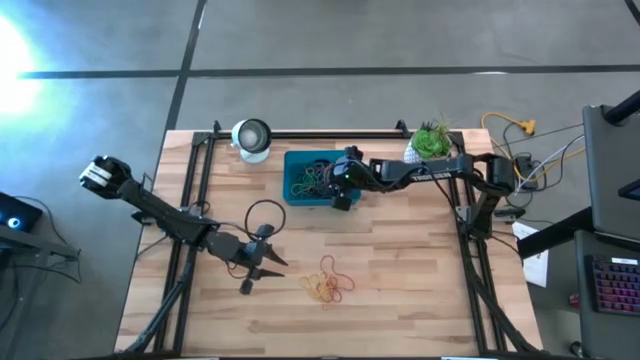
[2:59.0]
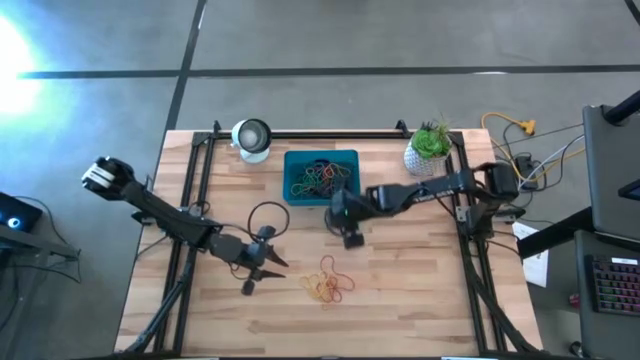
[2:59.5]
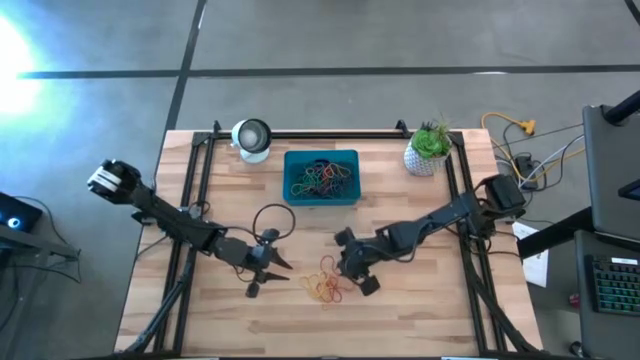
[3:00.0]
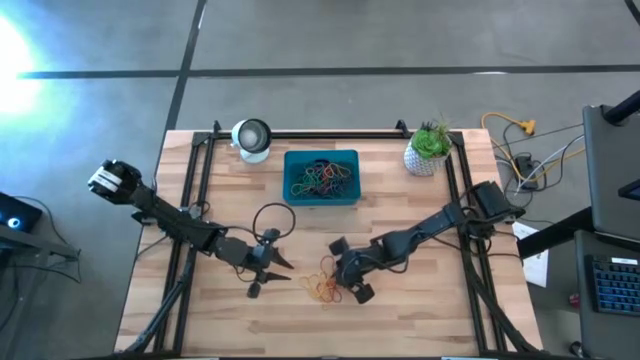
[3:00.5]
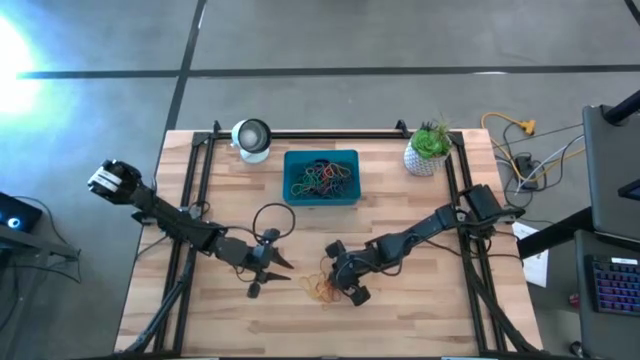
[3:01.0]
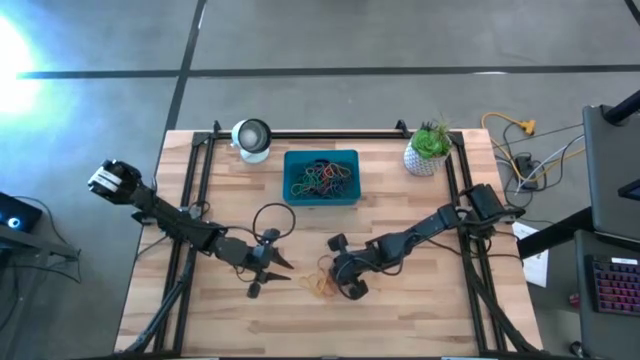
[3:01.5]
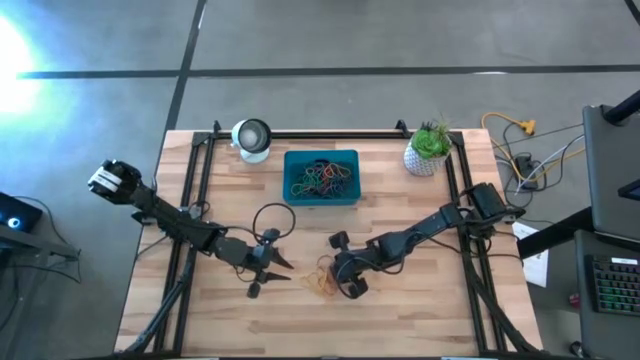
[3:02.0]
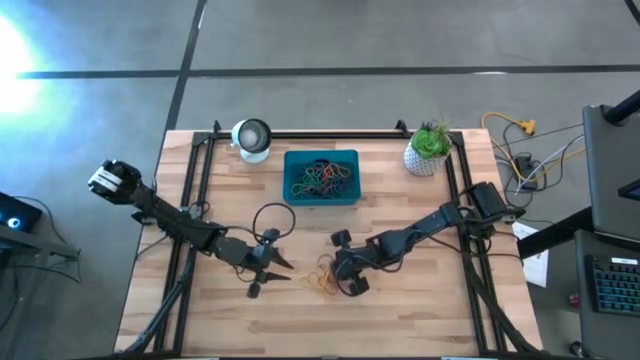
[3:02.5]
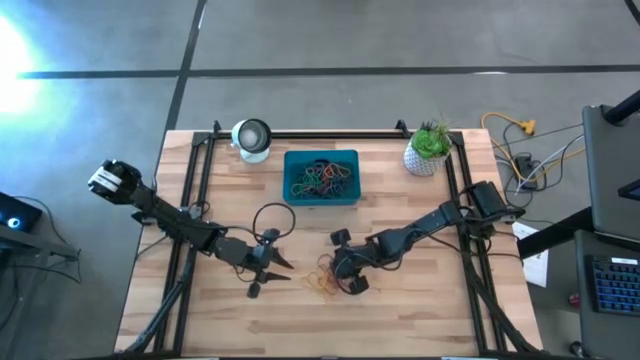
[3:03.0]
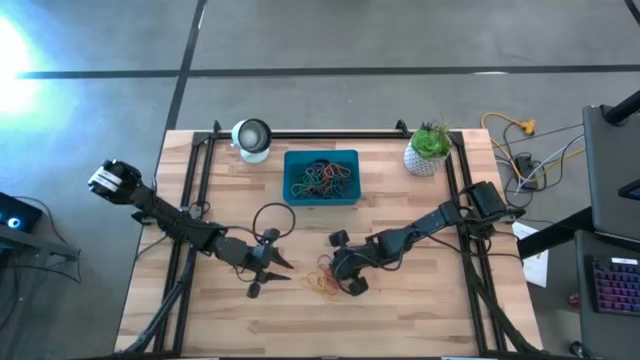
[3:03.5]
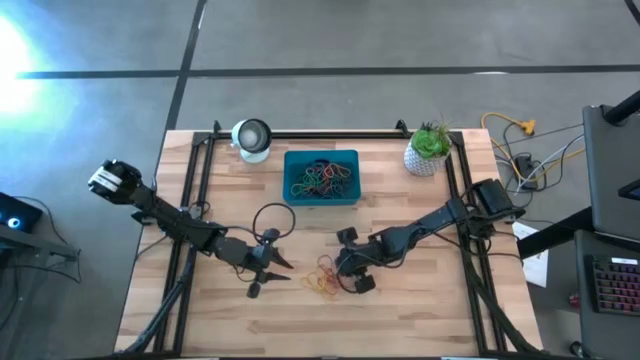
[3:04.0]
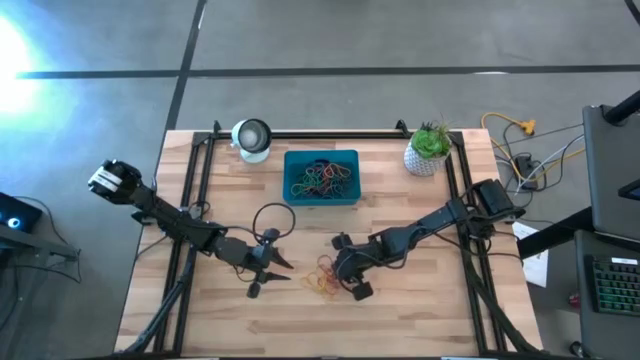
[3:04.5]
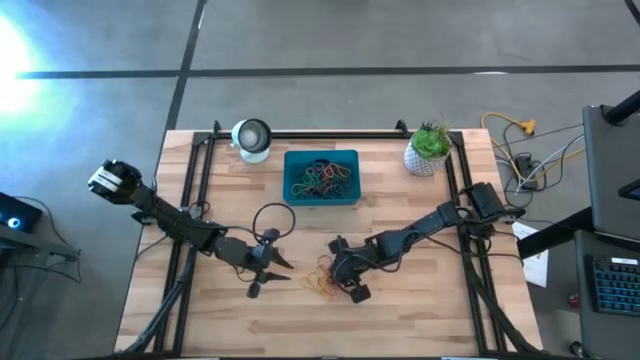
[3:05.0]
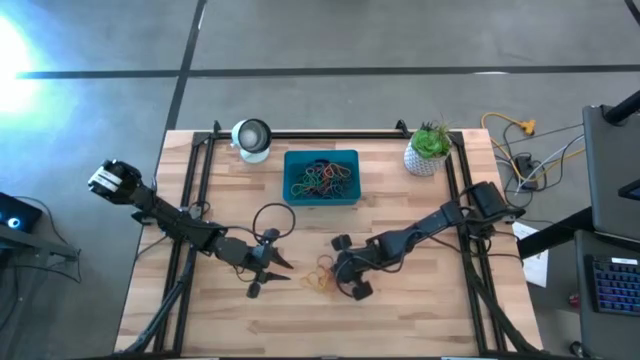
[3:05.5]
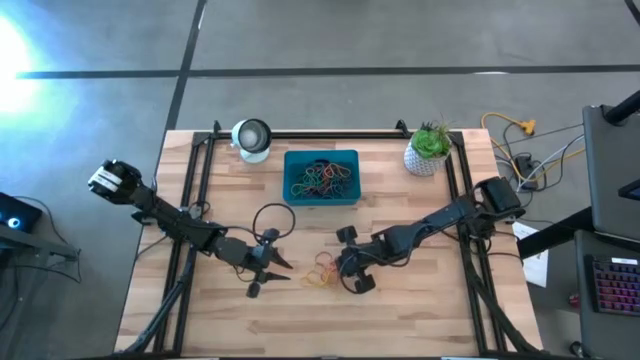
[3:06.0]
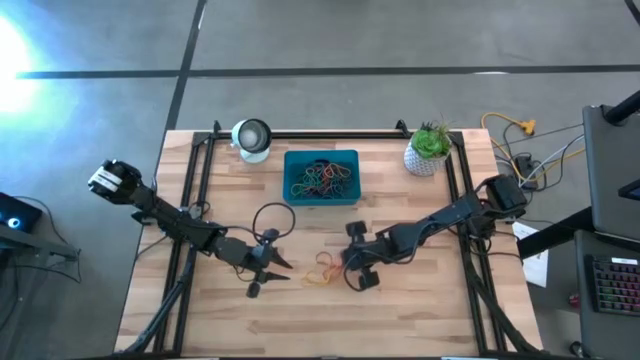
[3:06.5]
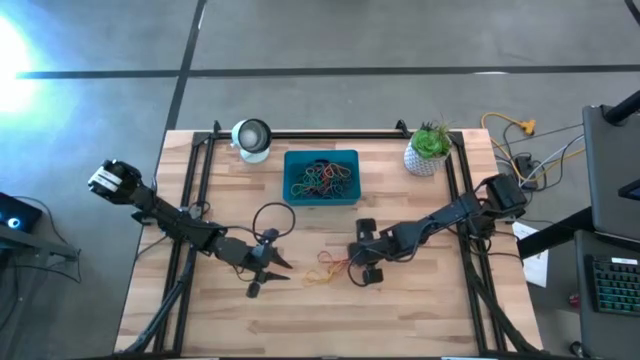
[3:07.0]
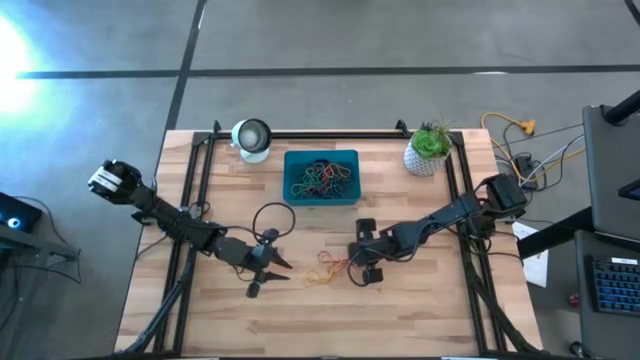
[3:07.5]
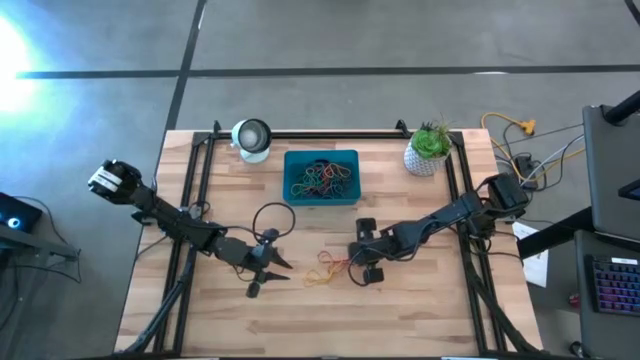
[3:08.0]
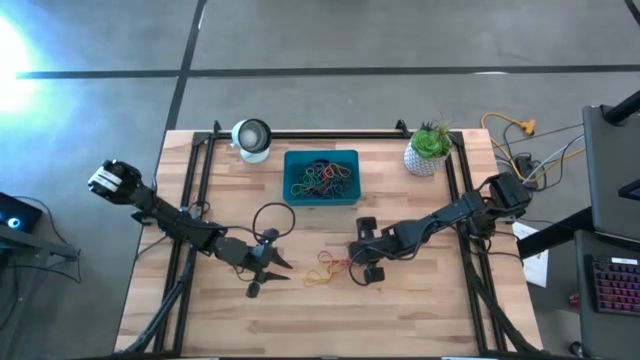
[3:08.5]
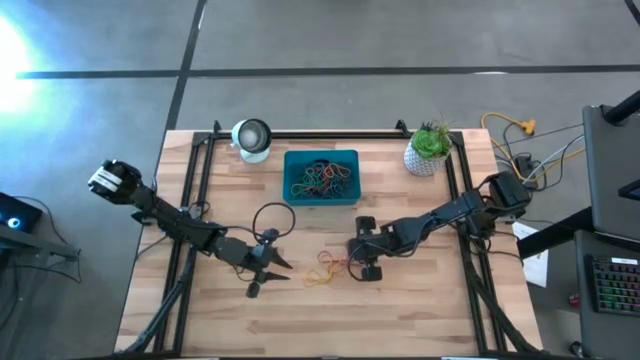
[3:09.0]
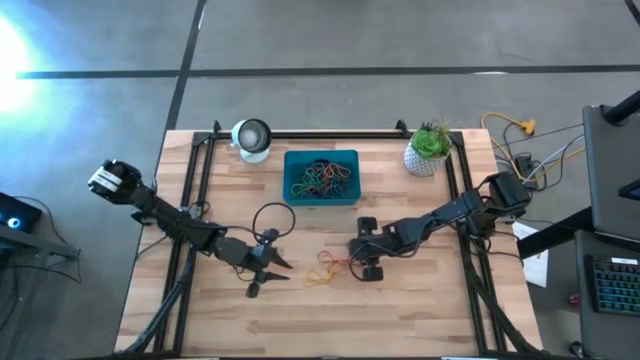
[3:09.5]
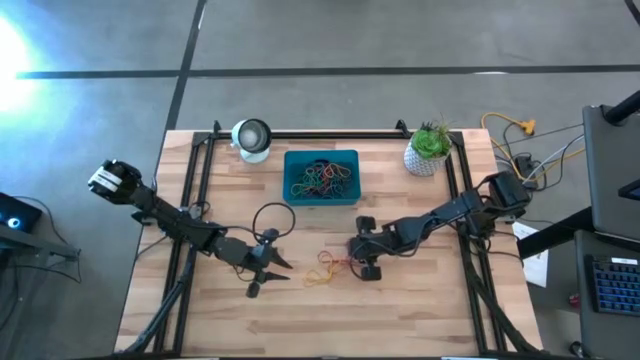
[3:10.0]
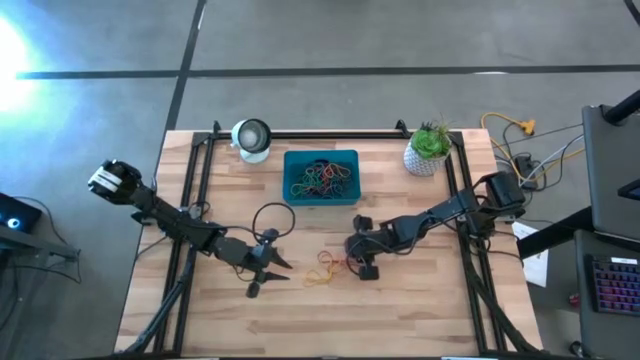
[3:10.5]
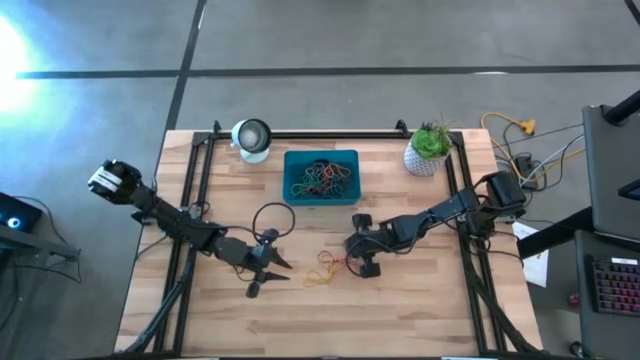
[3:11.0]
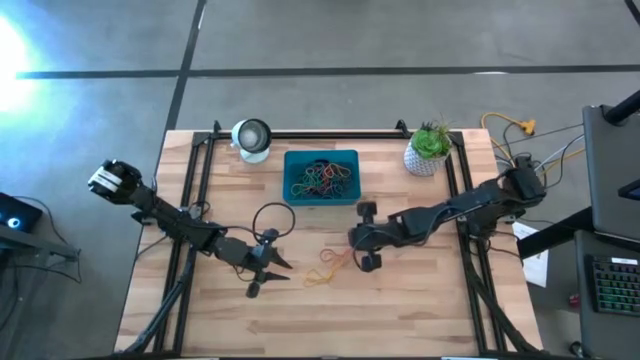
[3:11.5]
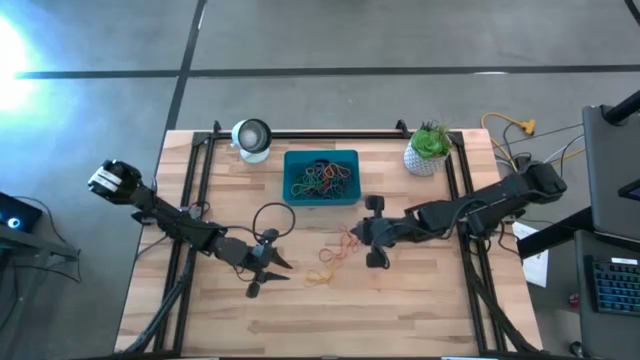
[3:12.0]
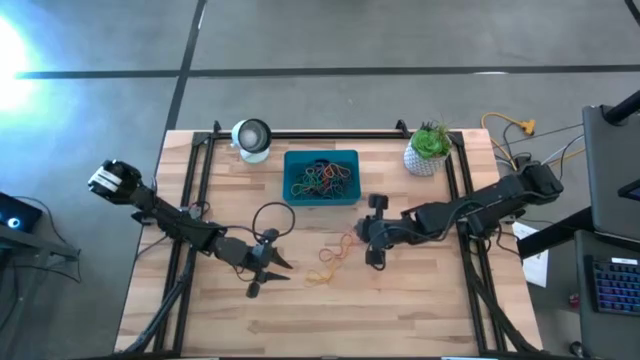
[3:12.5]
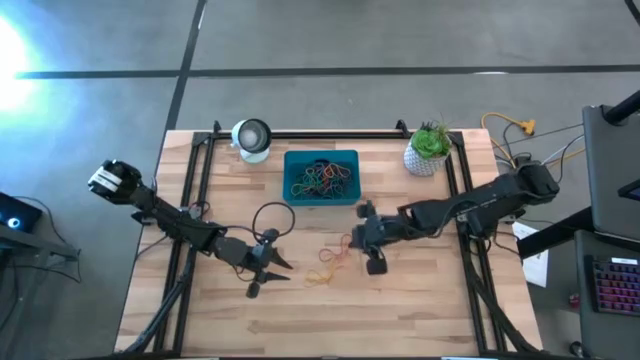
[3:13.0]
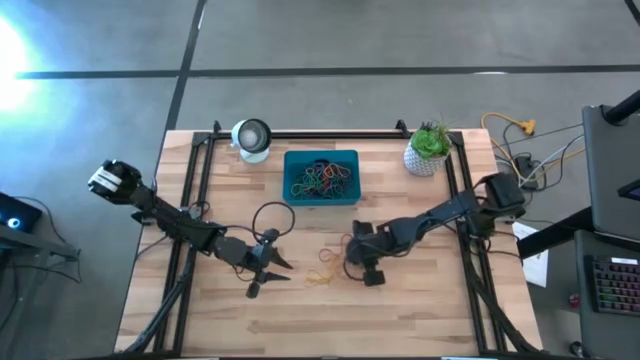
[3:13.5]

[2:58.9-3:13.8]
Task: Pick and place rubber bands into bin
Put the red rubber band into the bin

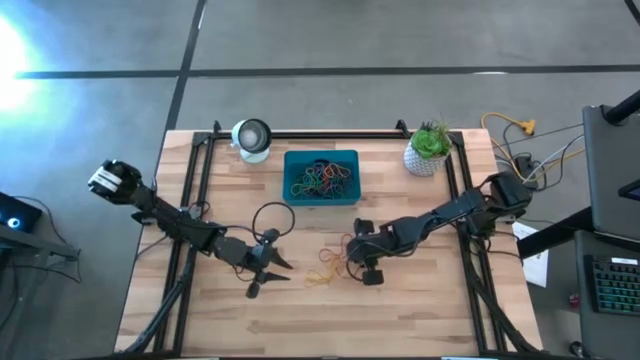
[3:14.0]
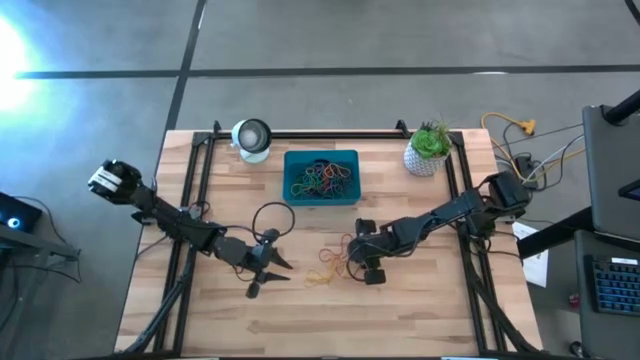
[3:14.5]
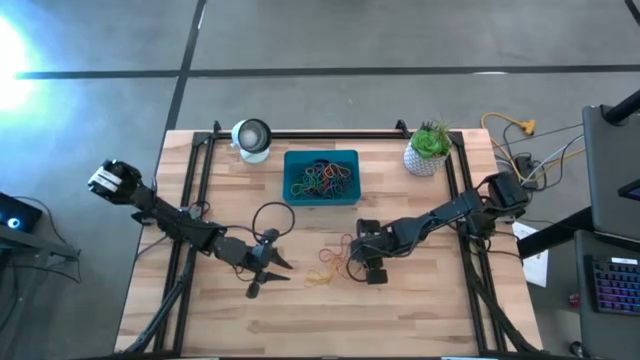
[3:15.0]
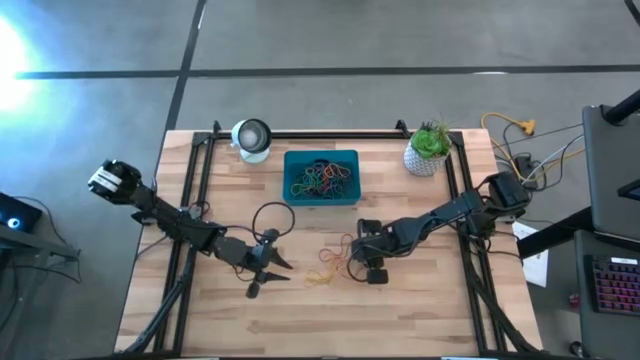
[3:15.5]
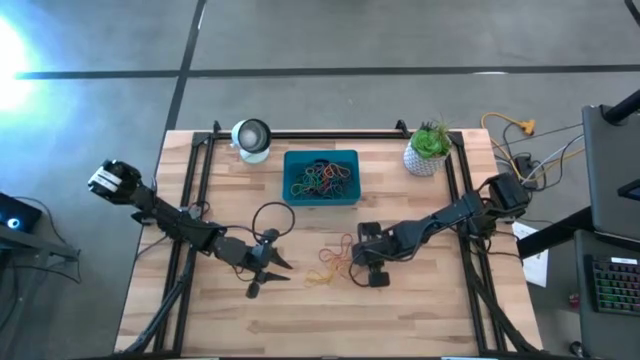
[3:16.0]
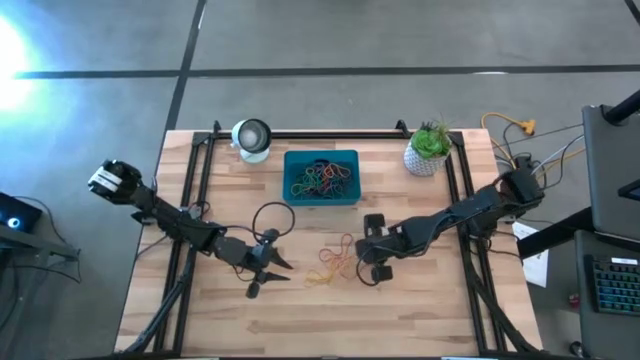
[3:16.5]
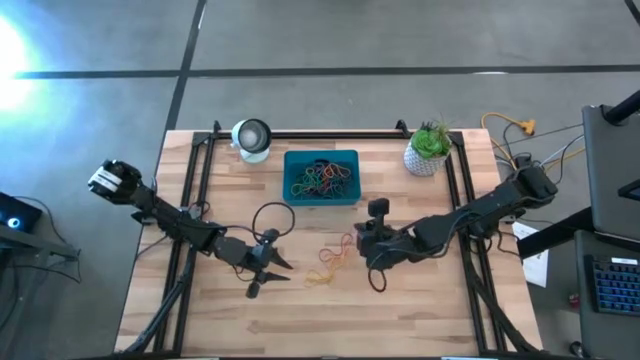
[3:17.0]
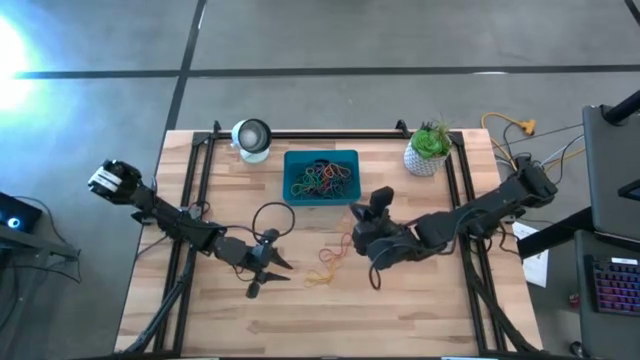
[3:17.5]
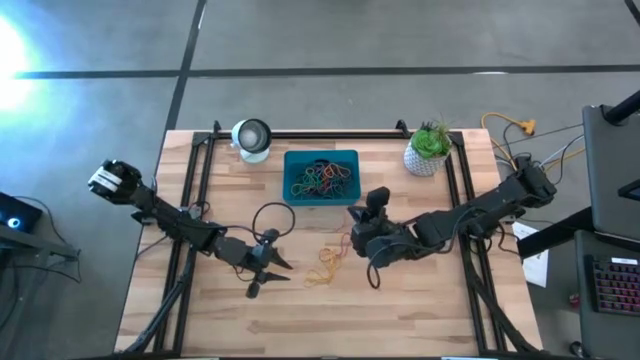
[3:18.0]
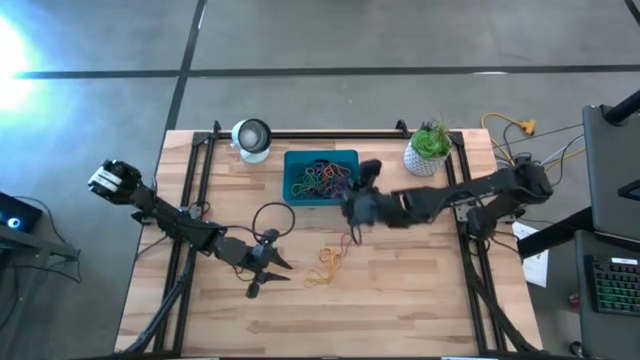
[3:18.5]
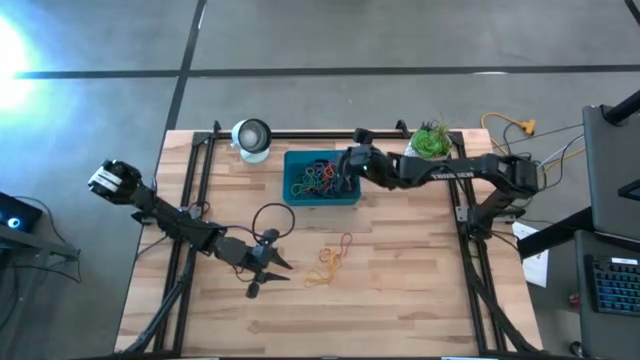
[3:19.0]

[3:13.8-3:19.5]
Put the red rubber band into the bin

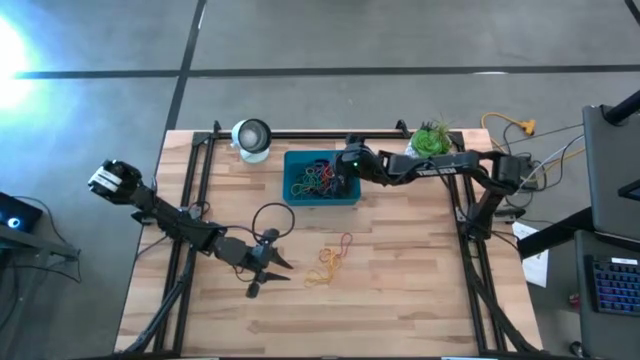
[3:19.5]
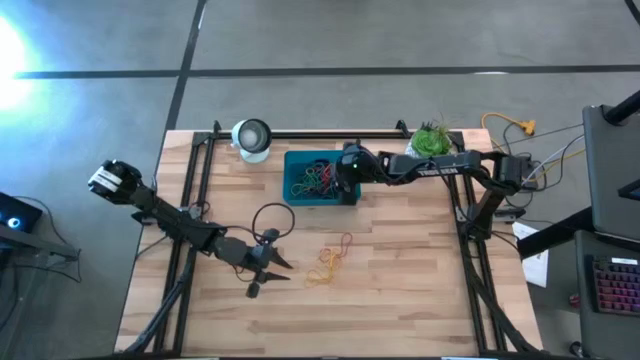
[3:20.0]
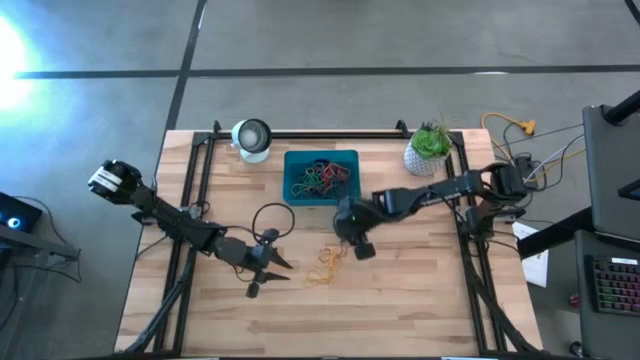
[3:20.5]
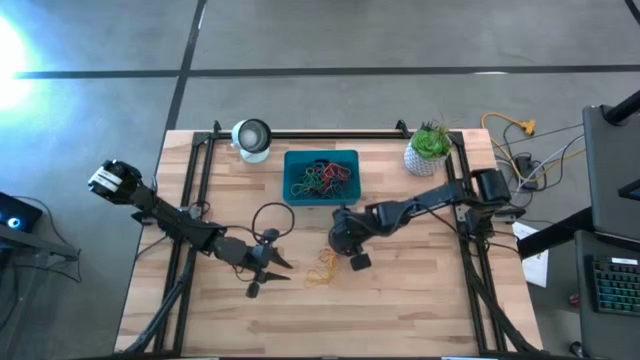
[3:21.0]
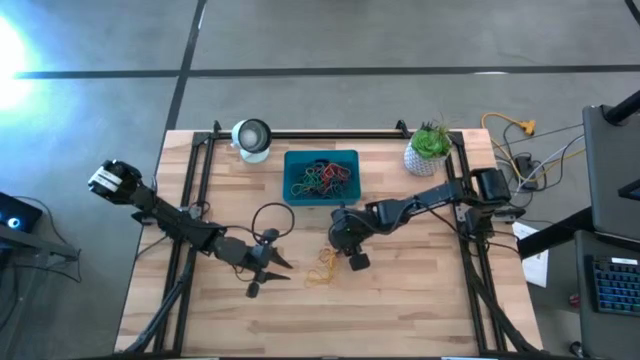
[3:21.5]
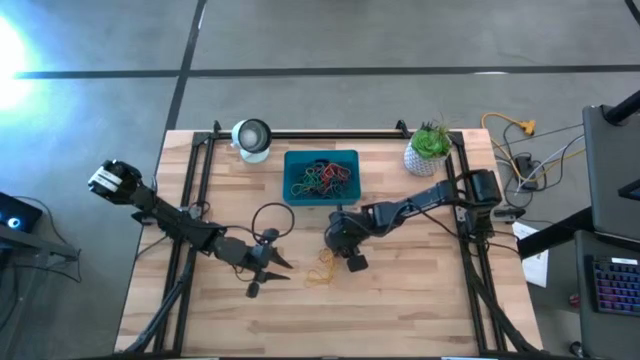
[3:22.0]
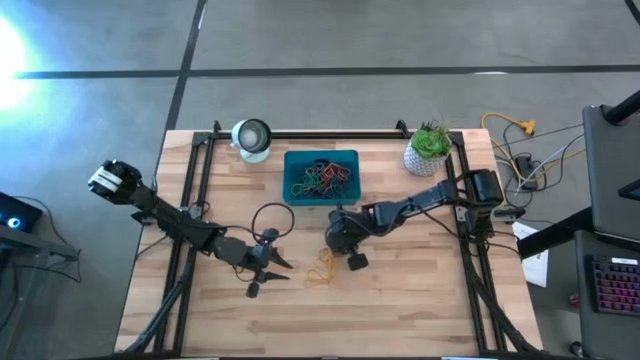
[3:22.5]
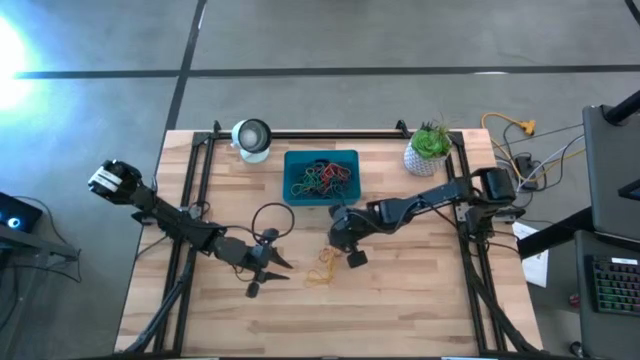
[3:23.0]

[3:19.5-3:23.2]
Put the yellow rubber band into the bin
